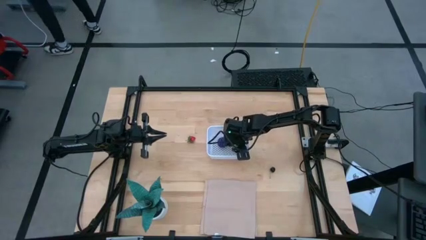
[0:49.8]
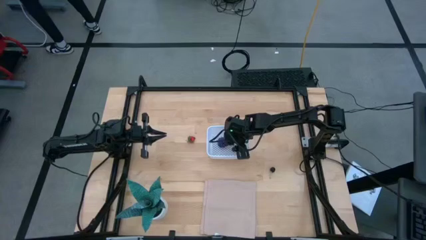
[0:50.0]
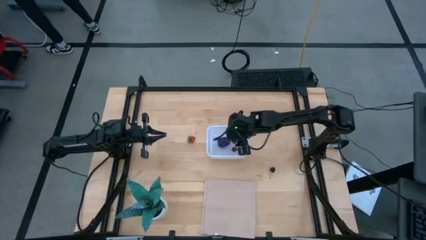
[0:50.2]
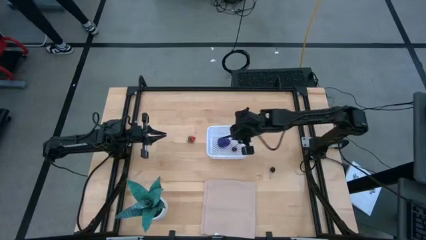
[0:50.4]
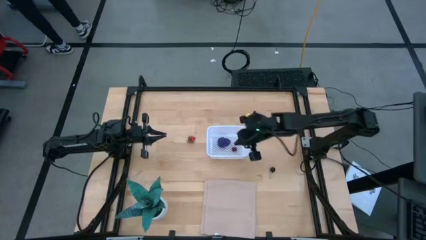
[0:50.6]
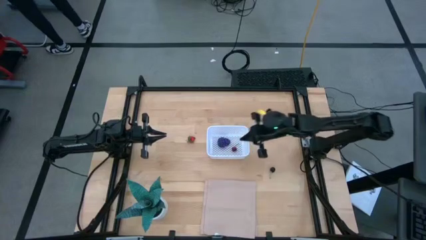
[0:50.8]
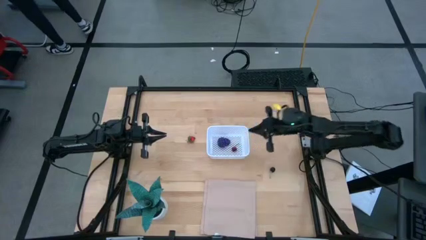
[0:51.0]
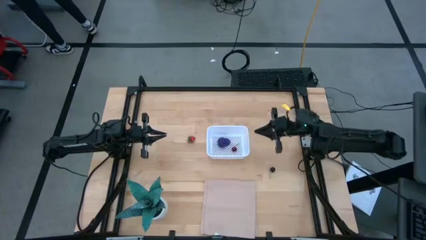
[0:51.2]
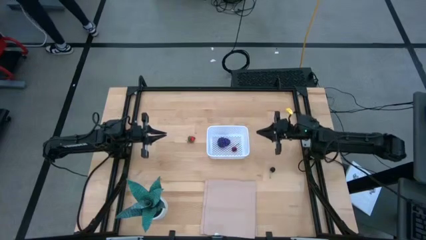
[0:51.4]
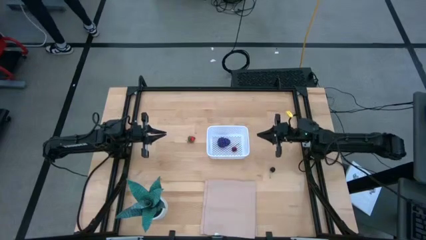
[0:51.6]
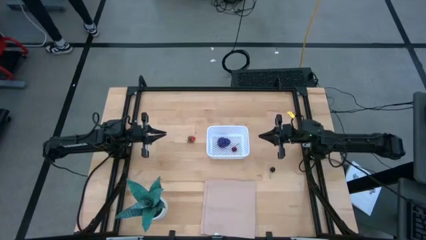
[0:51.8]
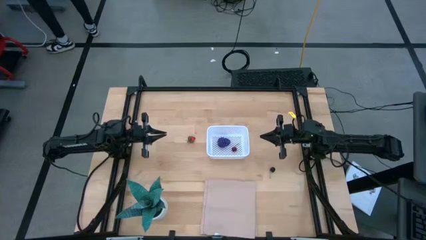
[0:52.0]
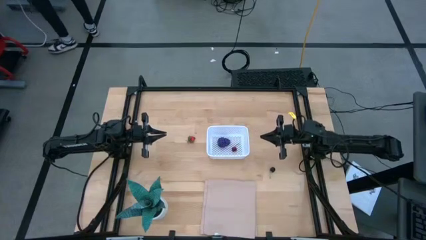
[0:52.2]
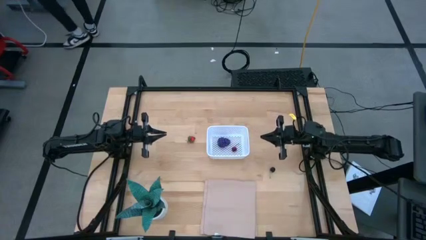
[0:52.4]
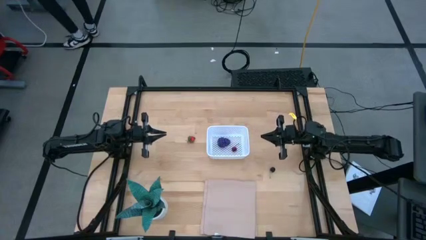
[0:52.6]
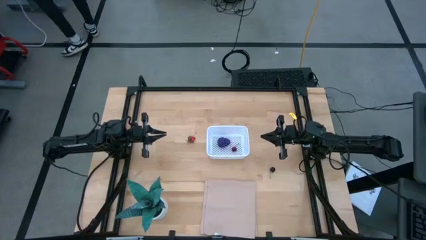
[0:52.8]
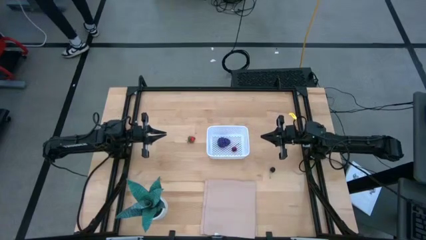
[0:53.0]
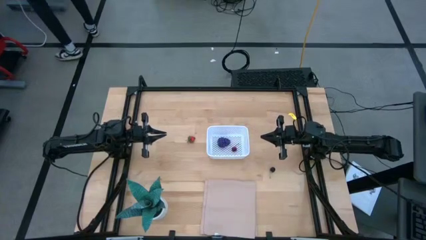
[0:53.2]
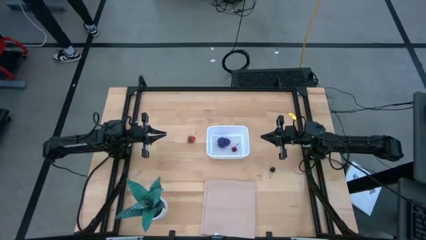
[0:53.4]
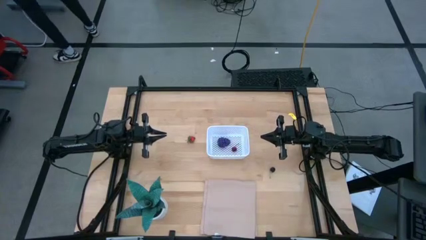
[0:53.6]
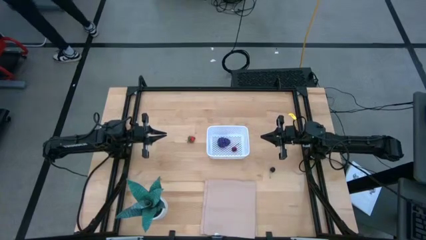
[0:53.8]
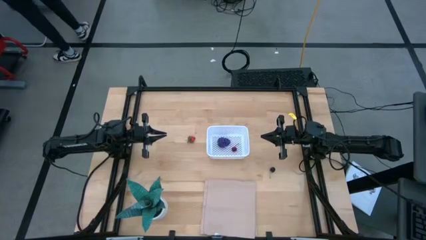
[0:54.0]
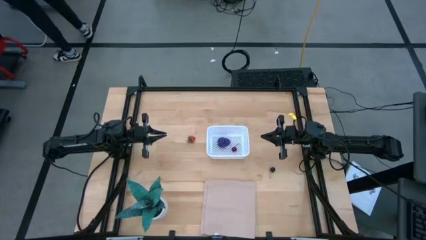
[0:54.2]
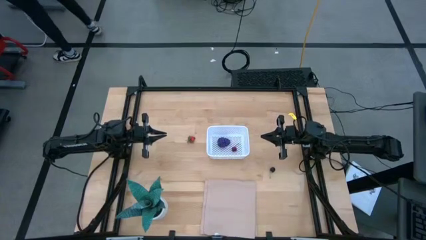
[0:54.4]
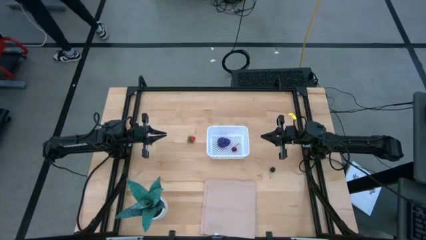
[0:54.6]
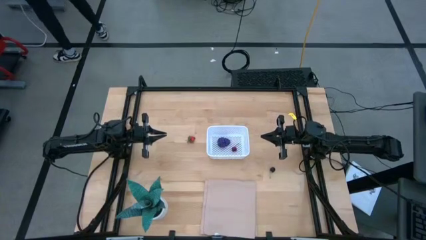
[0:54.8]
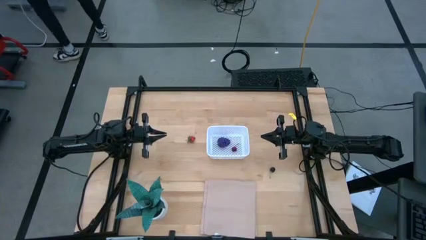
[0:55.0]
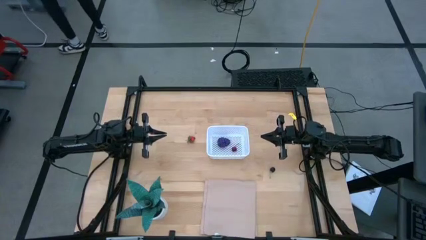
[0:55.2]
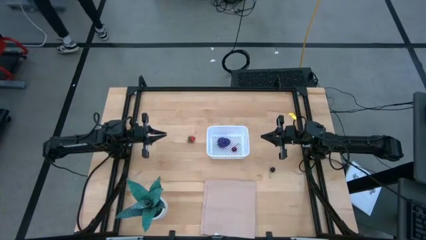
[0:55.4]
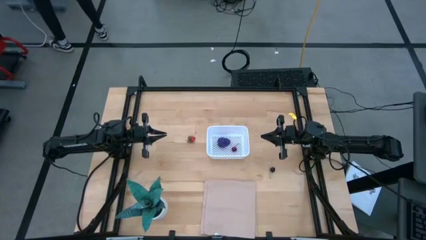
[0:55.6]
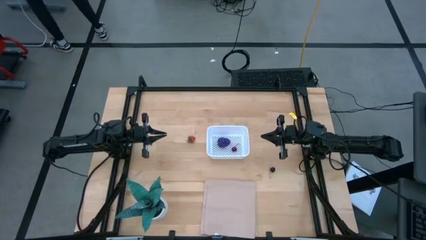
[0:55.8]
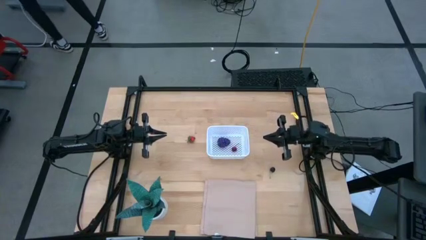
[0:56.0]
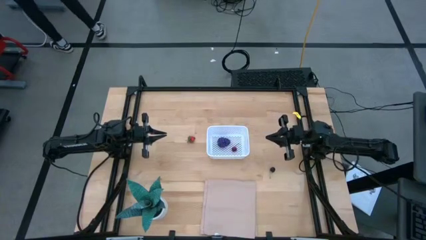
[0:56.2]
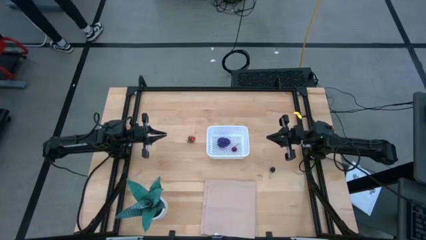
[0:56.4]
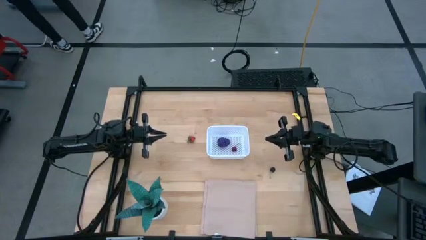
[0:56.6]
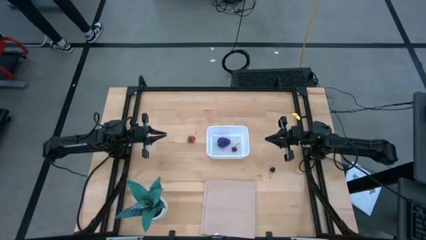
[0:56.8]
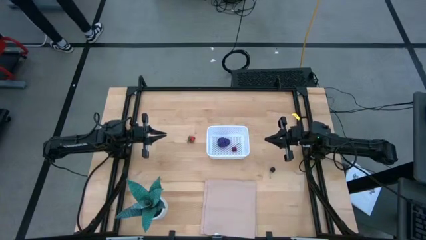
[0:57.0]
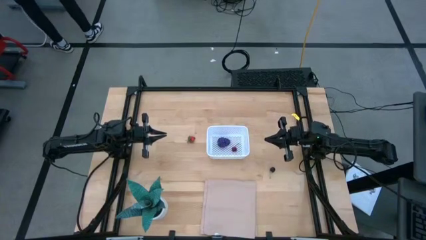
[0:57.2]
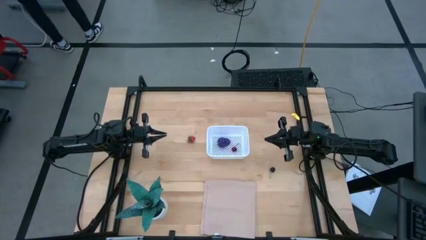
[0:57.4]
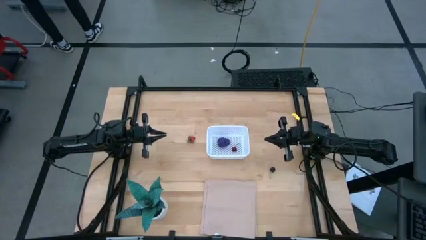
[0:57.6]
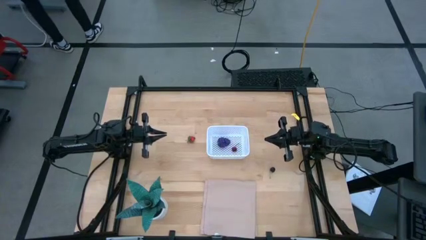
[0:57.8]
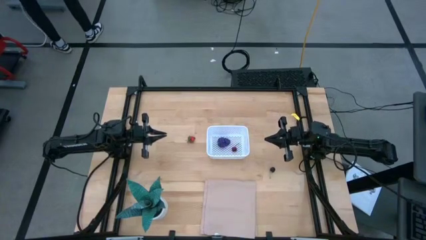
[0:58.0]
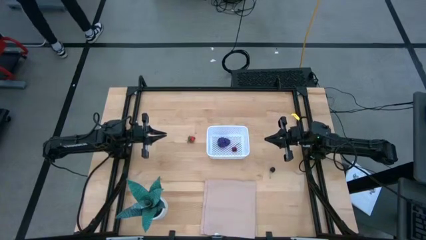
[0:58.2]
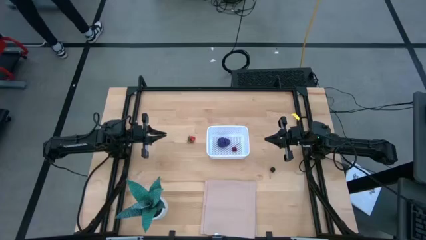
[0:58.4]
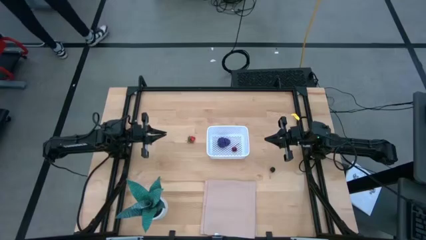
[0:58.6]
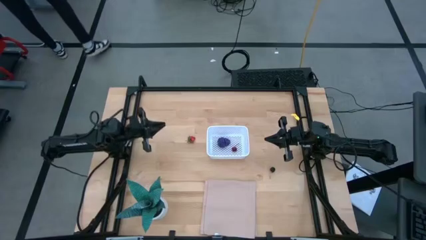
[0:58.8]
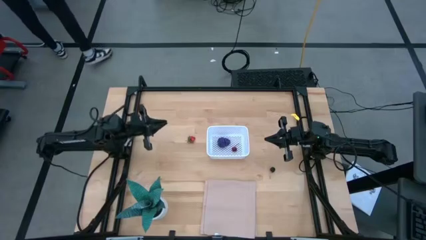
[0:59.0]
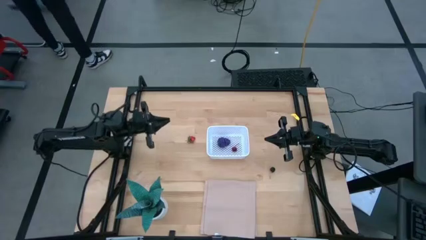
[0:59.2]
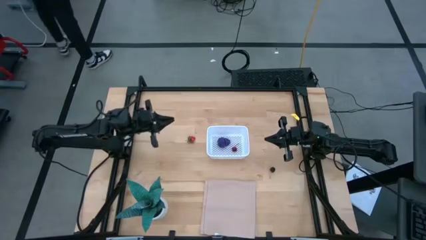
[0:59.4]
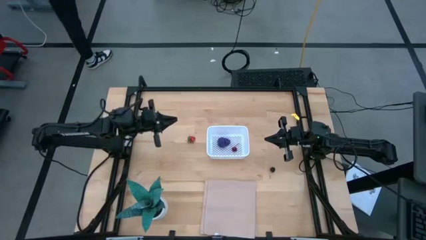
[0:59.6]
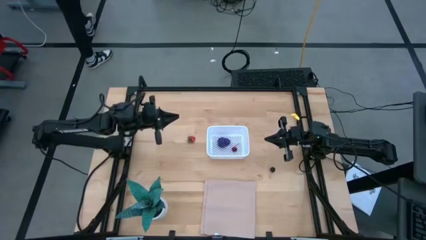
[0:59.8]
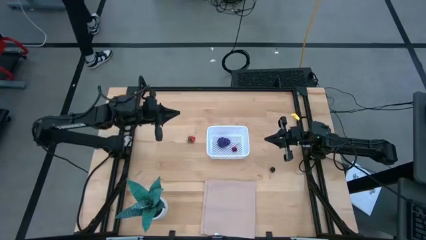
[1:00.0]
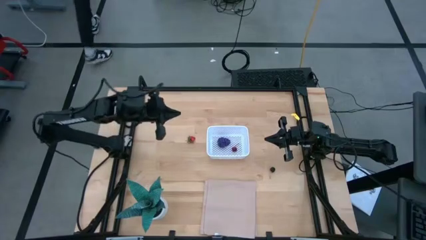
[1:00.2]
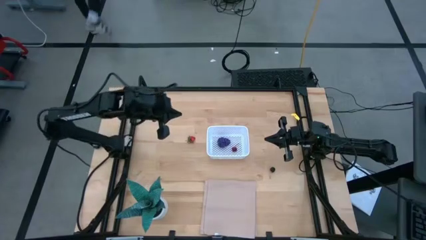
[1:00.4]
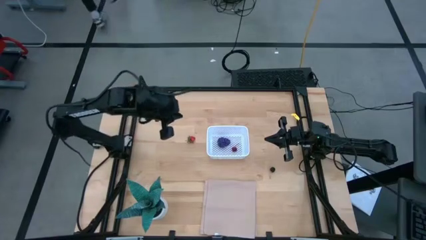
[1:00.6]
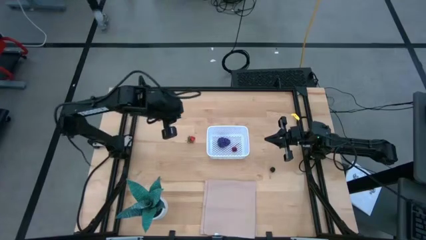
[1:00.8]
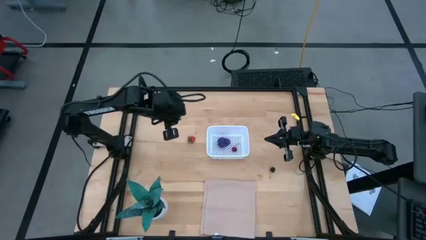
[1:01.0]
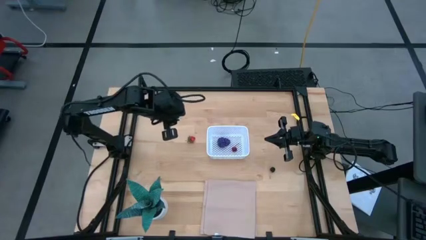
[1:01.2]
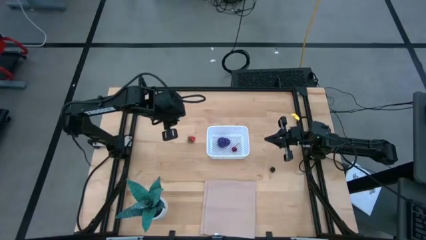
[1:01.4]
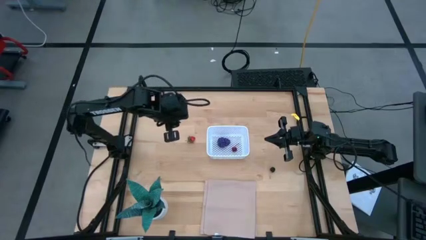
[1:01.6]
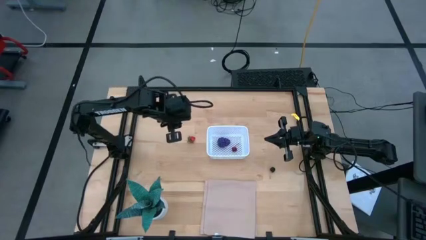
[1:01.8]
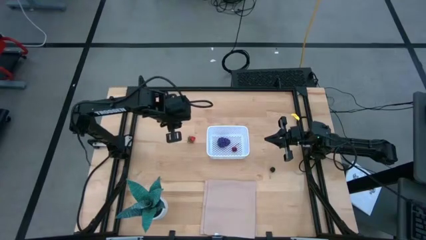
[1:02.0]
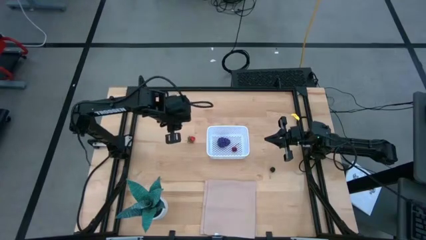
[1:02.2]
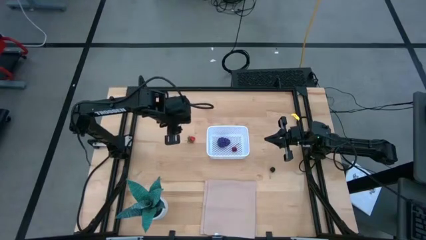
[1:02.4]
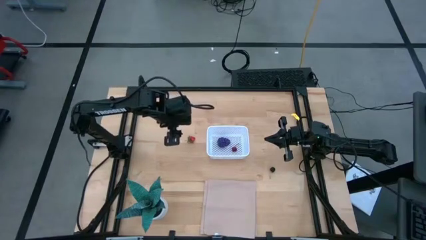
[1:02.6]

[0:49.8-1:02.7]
Task: Pick and placing Produce into tupperware
Put the strawberry into the white bin
